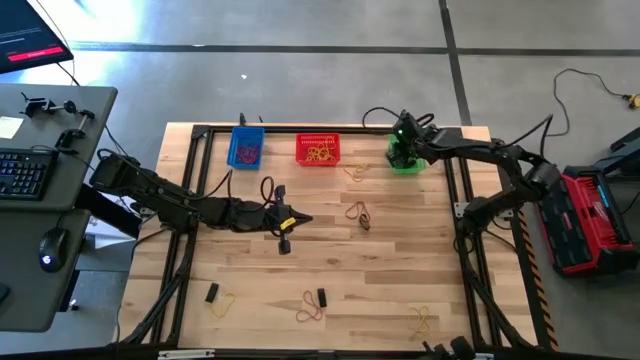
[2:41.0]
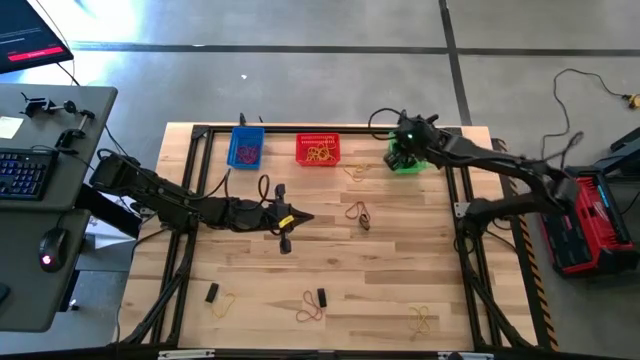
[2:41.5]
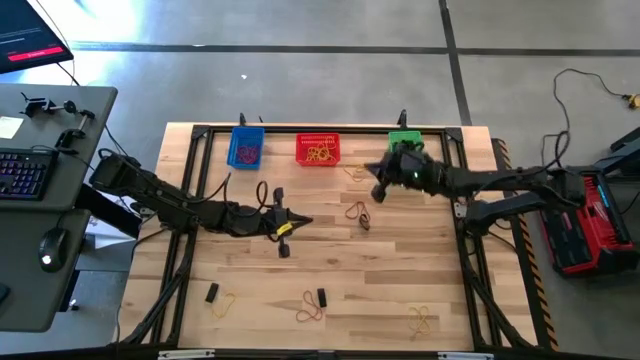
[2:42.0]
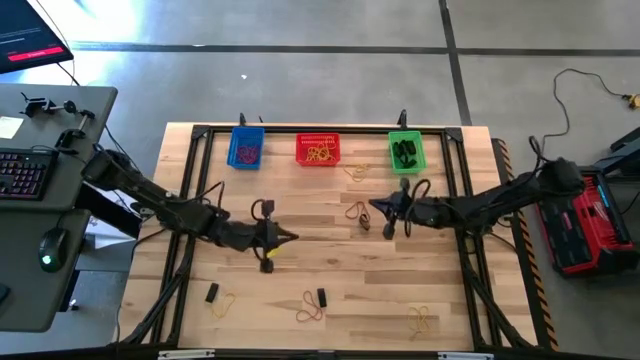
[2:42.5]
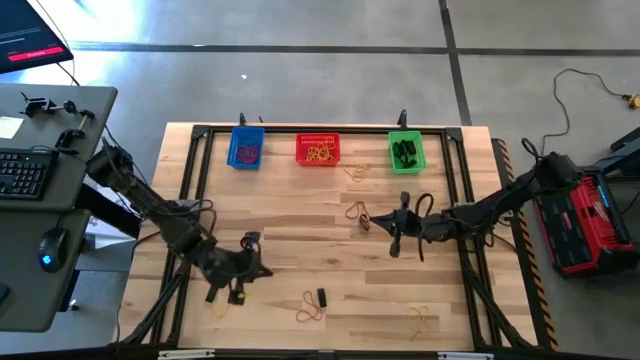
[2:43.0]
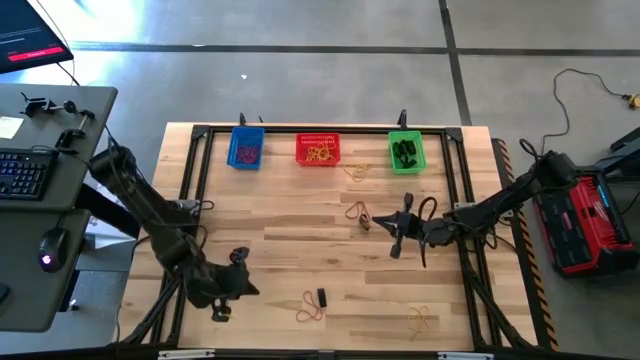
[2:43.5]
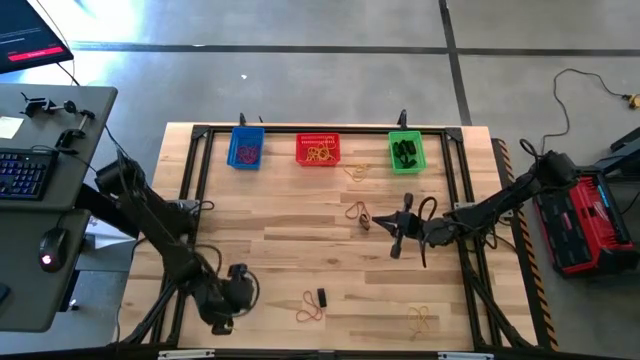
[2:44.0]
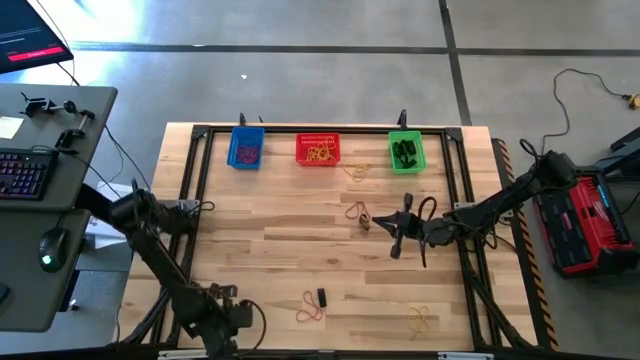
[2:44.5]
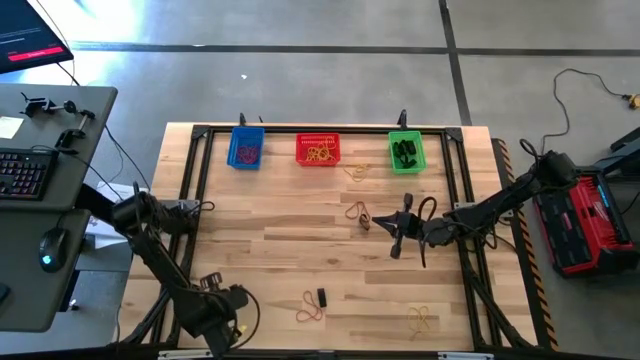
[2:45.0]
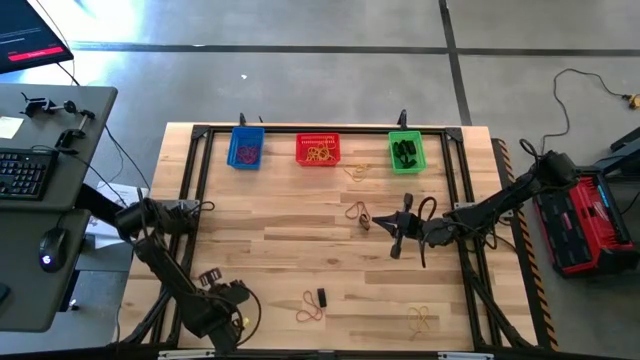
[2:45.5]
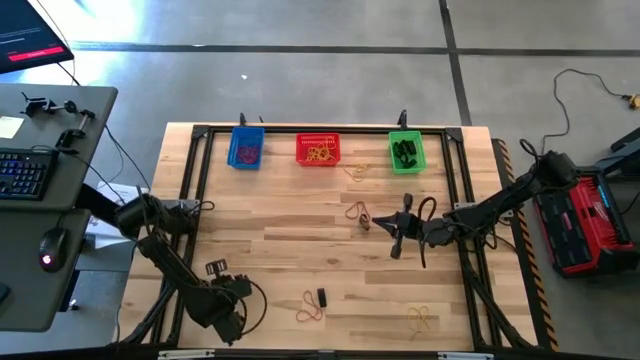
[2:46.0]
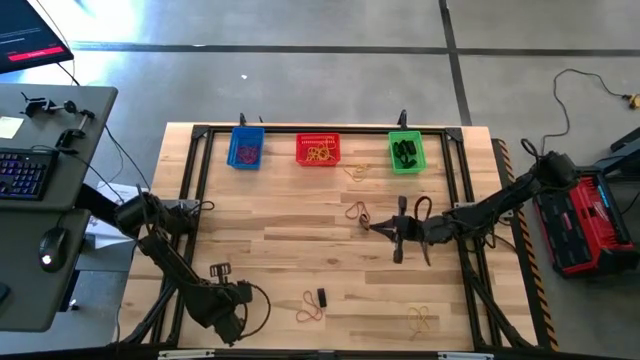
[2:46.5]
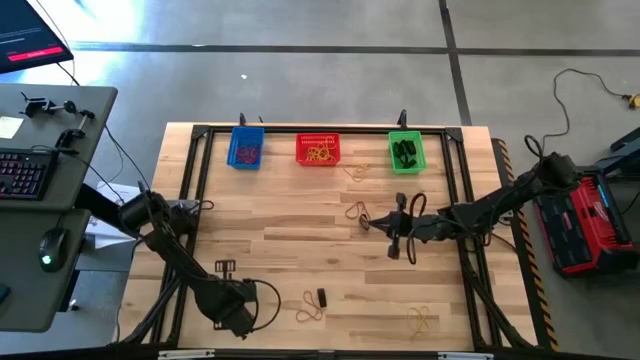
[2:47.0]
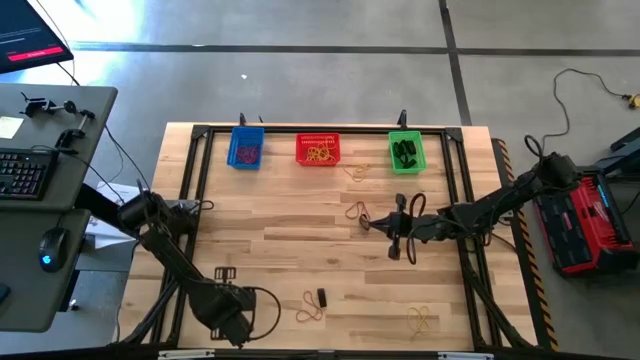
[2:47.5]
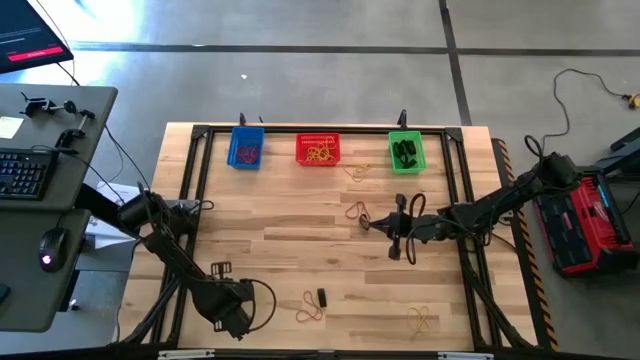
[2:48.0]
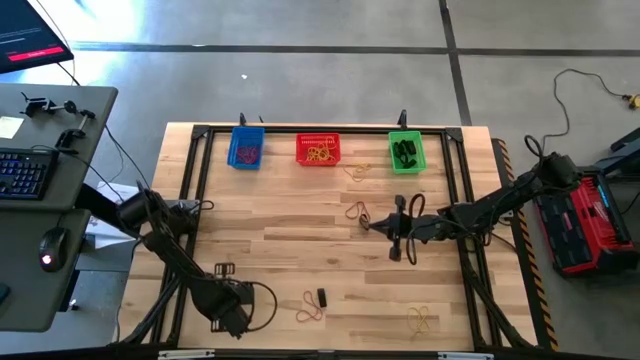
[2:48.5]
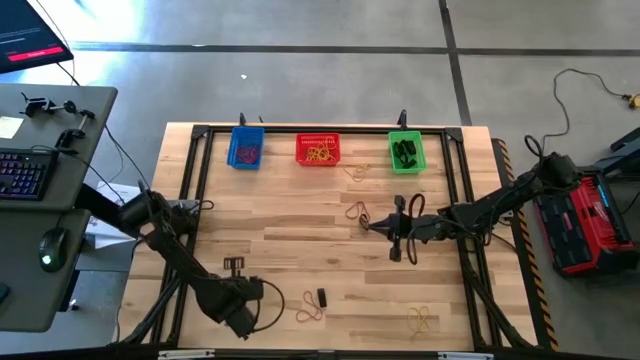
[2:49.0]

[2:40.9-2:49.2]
Task: Sort rubber bands into baskets
Put the yellow rubberband into the orange bin

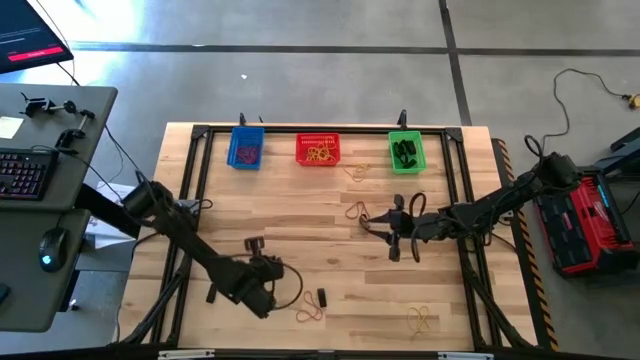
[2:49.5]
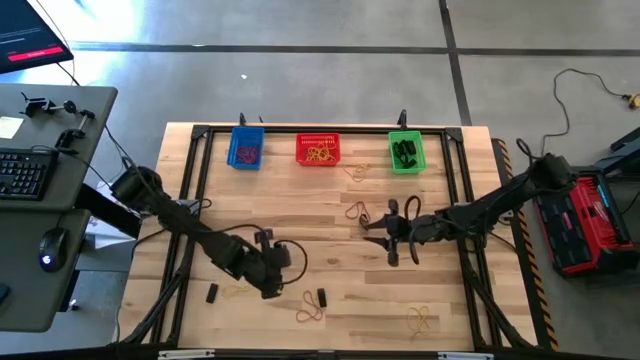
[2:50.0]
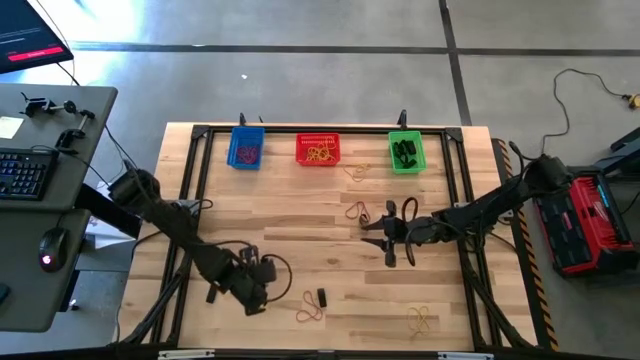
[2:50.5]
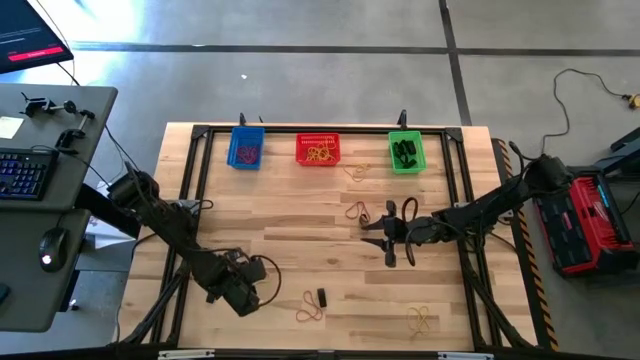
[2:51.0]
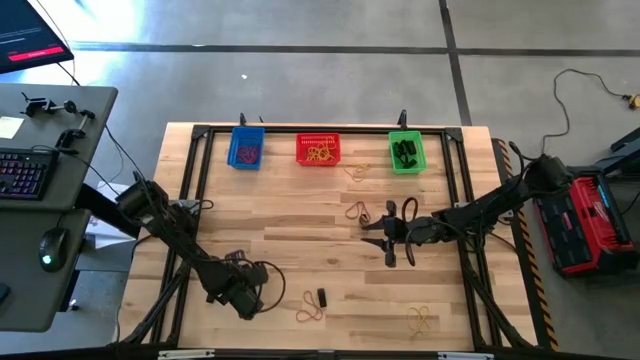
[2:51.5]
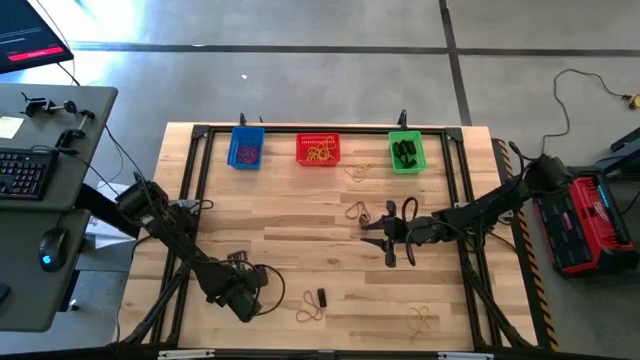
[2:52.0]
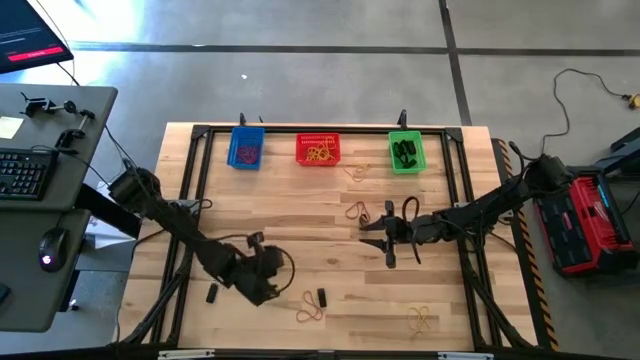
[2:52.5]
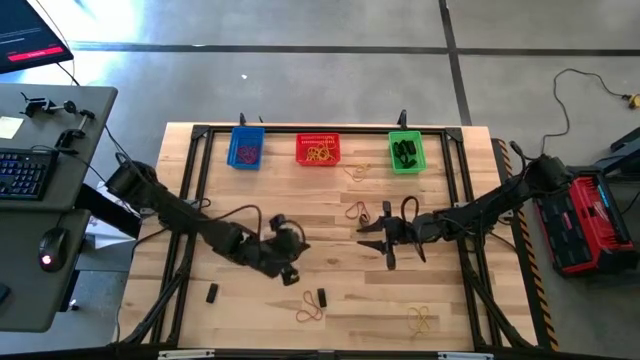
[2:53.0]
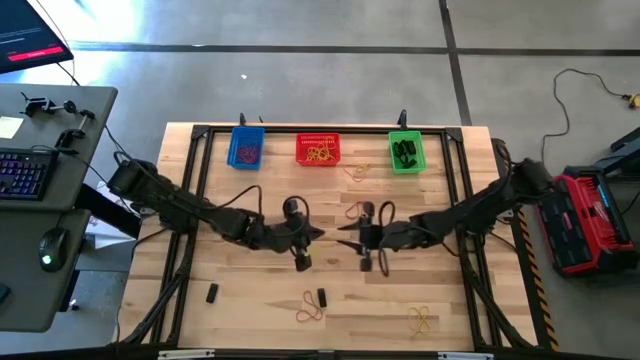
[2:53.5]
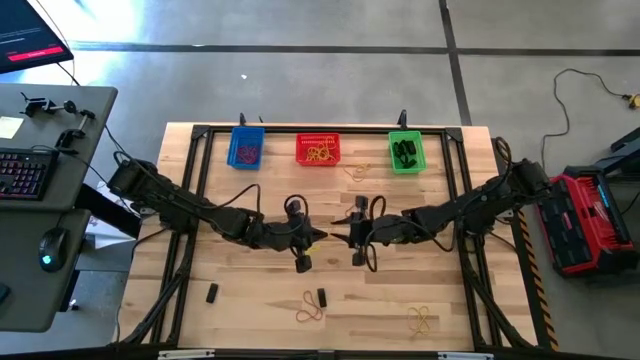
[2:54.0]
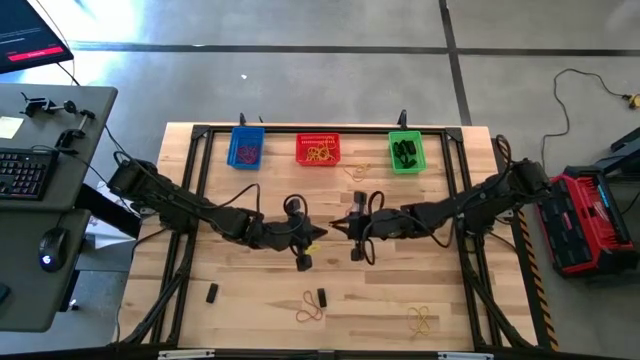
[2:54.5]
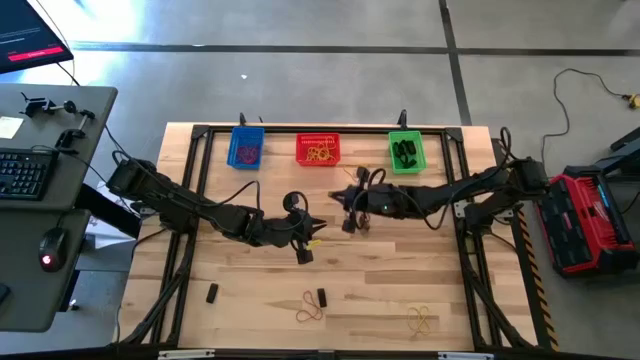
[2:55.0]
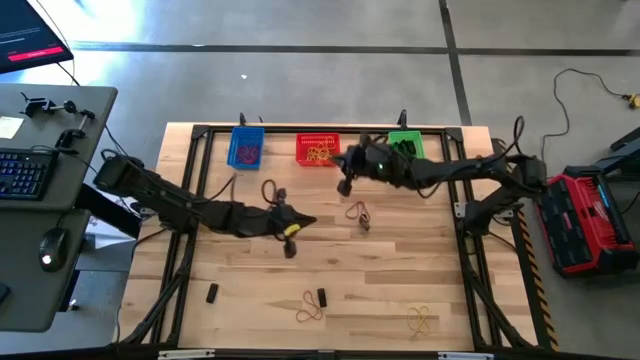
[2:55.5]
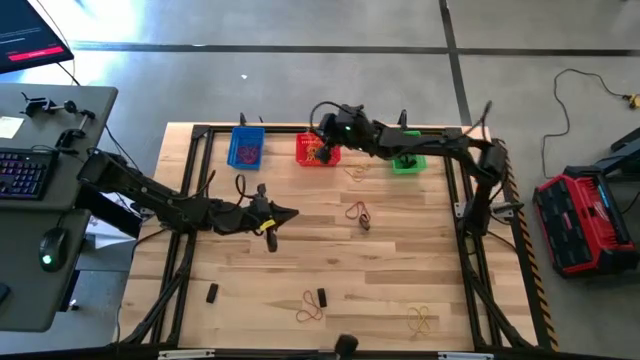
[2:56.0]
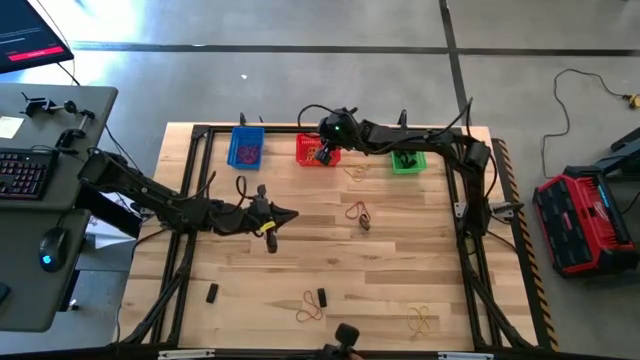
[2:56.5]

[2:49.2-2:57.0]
Put the yellow rubberband into the orange bin

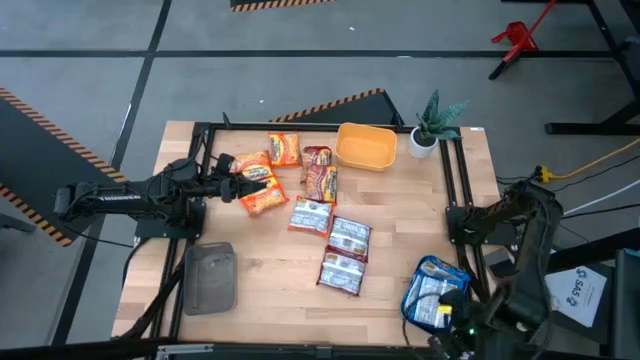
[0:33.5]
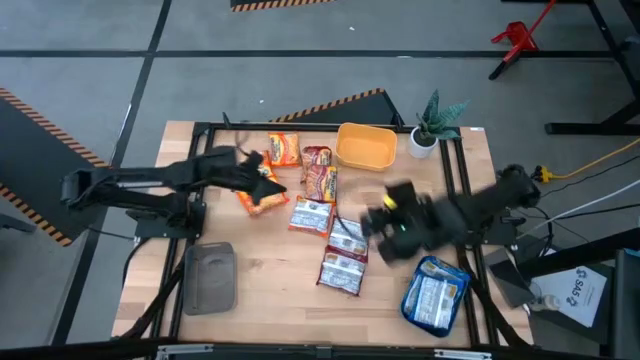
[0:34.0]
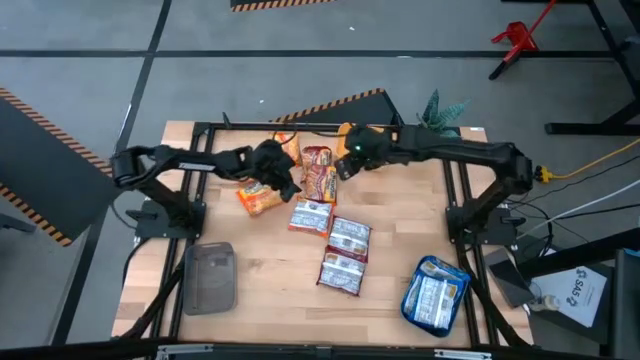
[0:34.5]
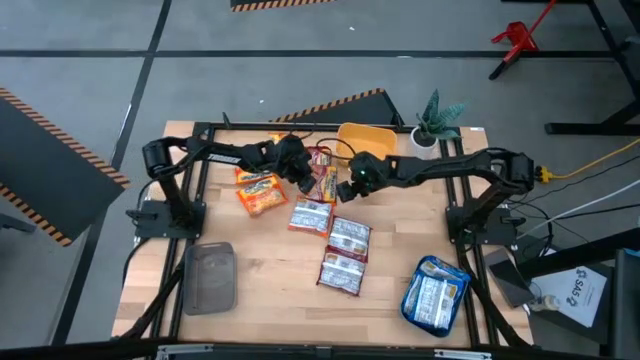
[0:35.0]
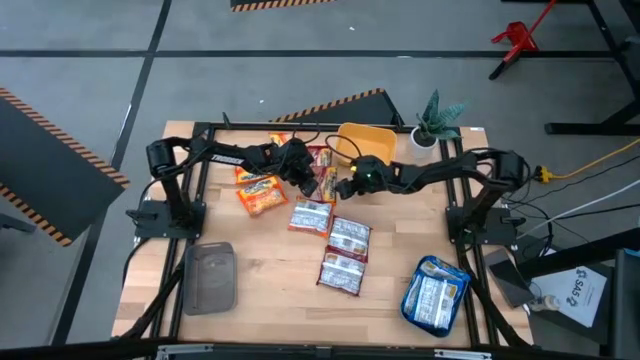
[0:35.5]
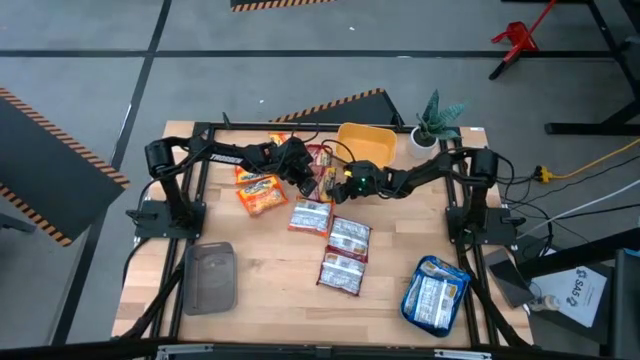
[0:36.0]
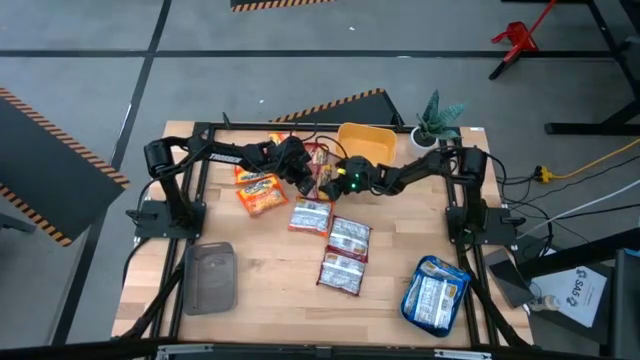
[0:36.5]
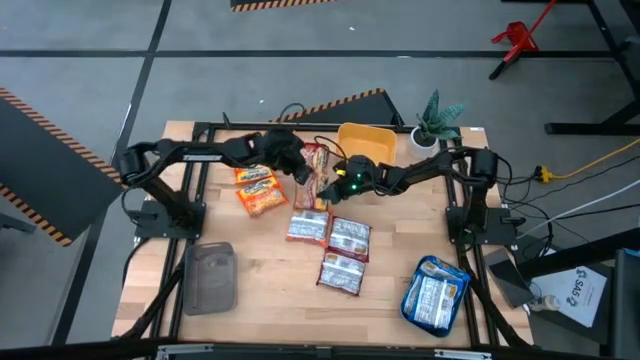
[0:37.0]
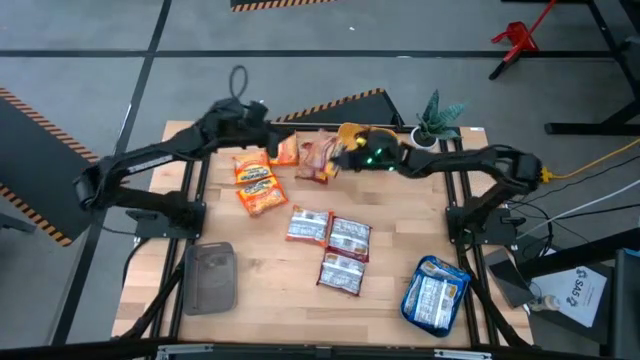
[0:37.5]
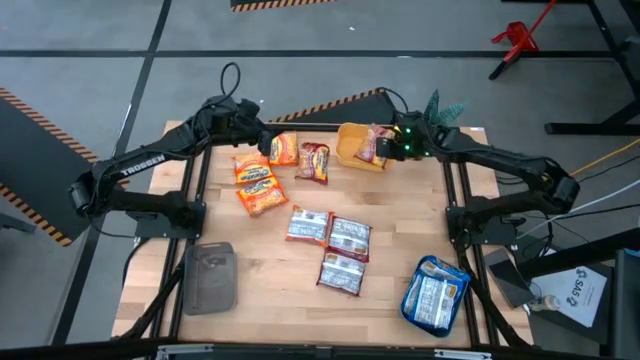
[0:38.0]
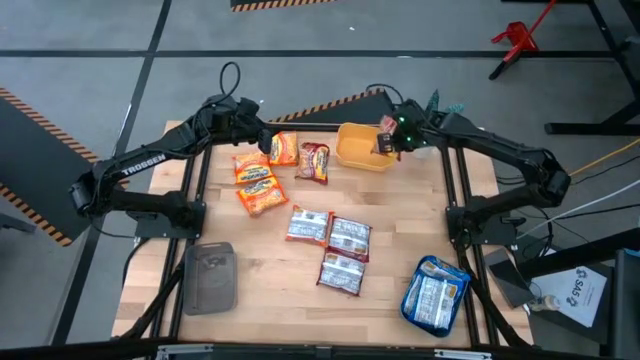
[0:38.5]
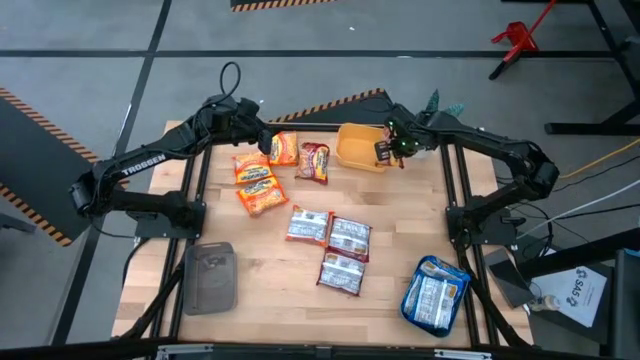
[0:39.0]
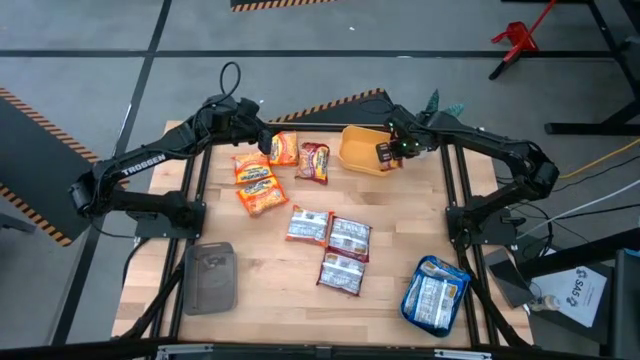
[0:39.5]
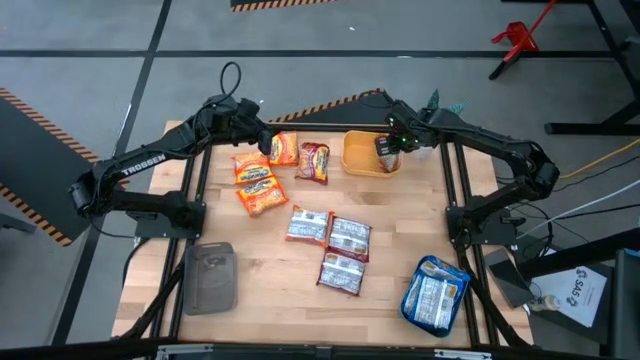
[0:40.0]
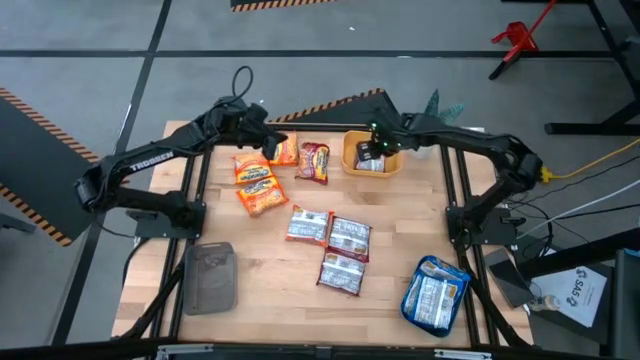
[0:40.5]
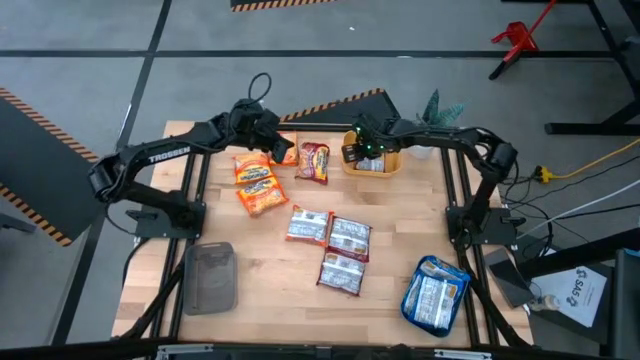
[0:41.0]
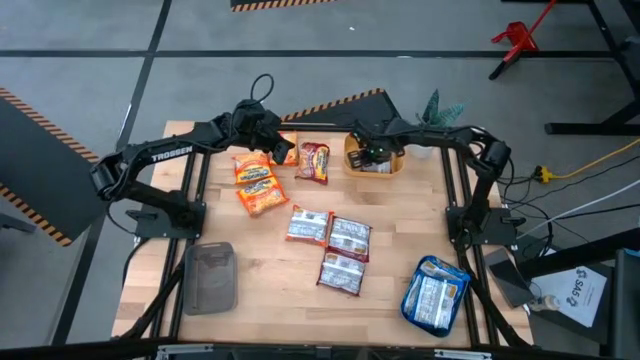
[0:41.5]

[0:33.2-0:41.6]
Task: Sort Maruchan noodles
Put the red noodle pack into the yellow bin
